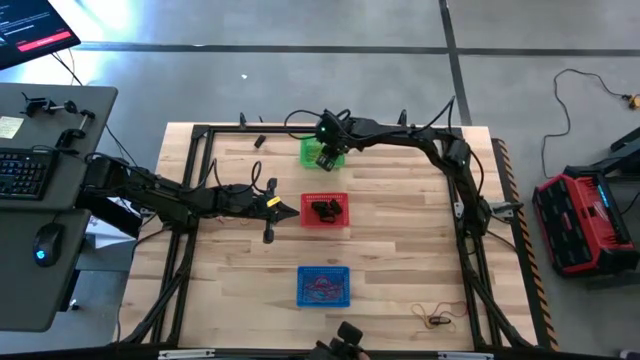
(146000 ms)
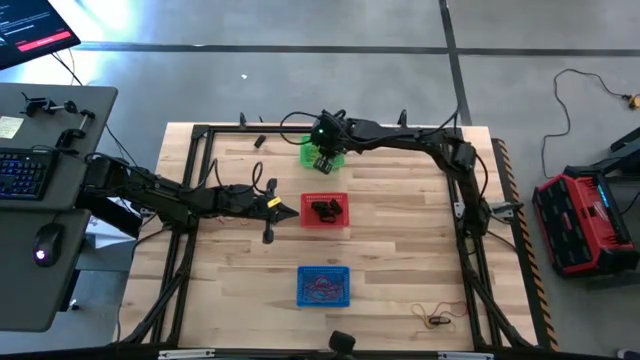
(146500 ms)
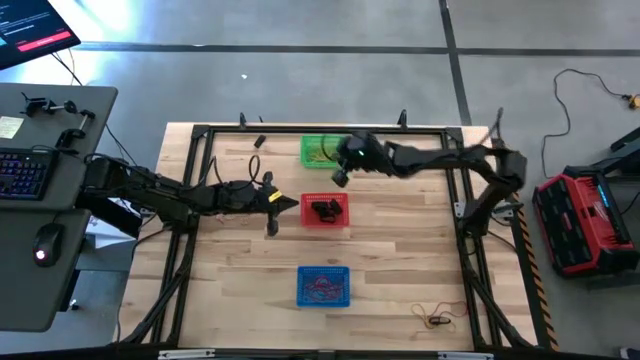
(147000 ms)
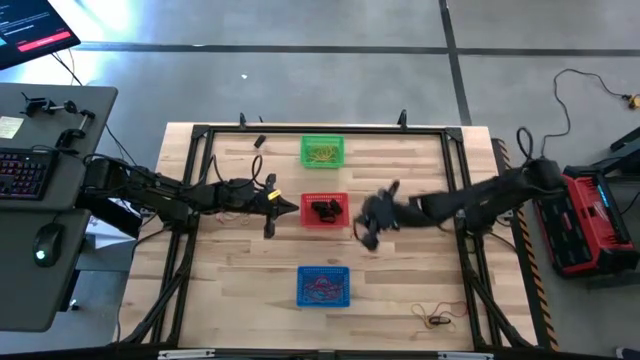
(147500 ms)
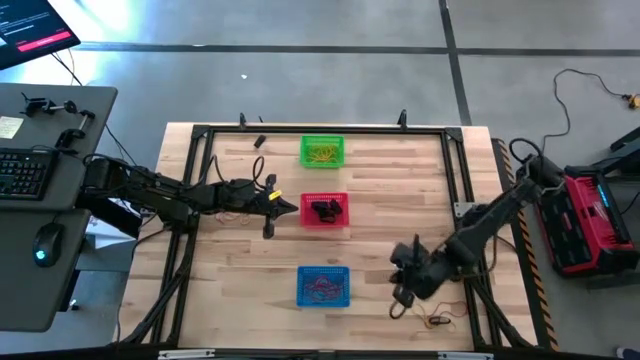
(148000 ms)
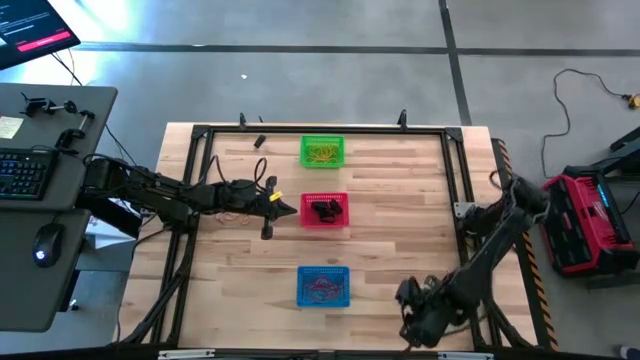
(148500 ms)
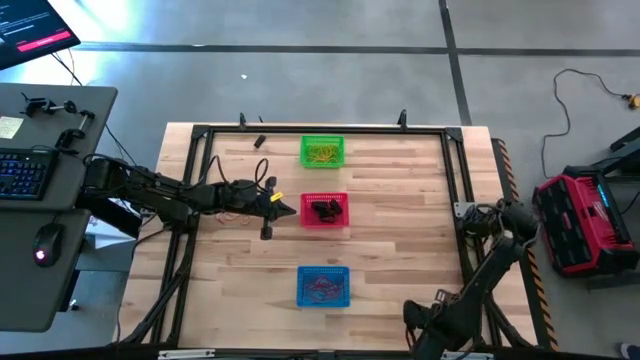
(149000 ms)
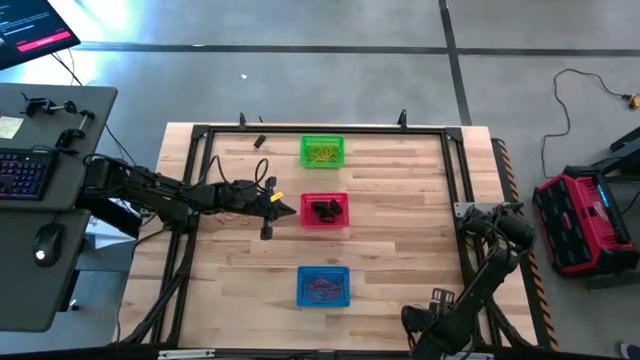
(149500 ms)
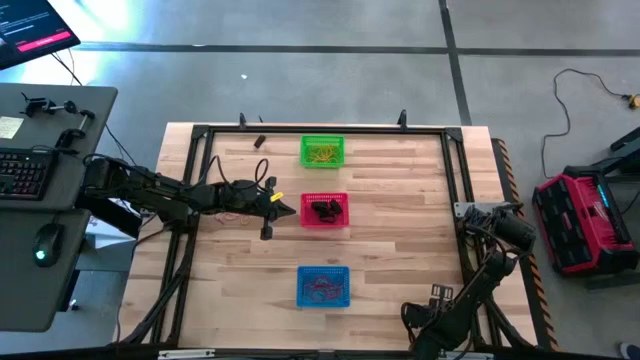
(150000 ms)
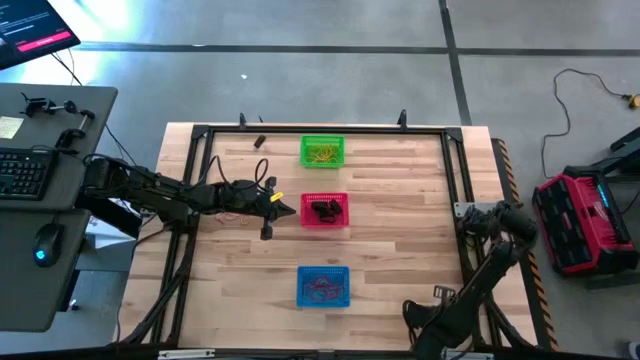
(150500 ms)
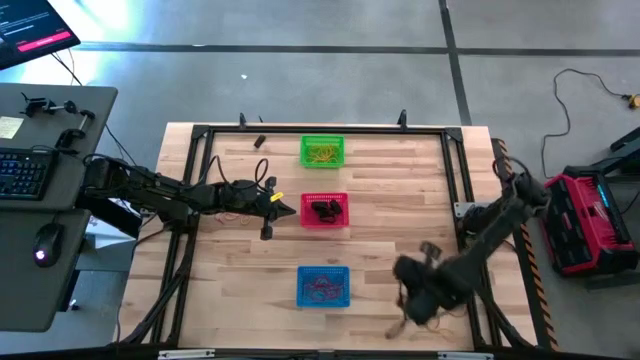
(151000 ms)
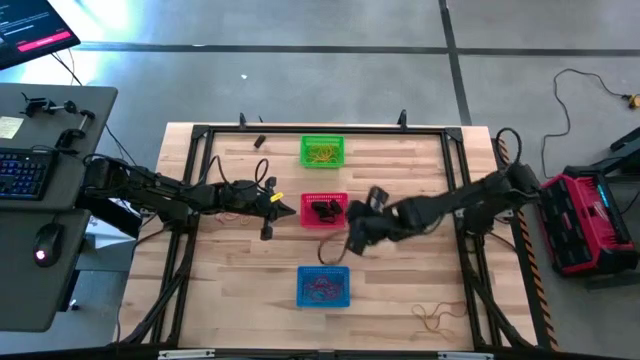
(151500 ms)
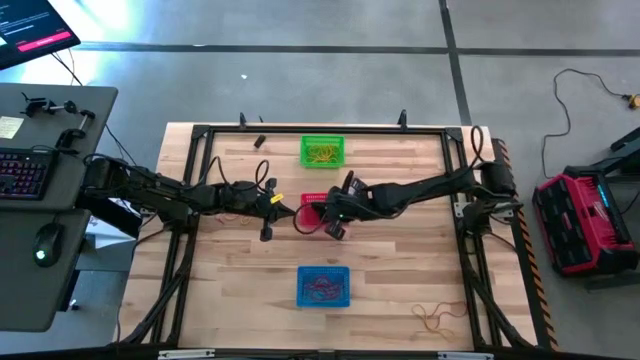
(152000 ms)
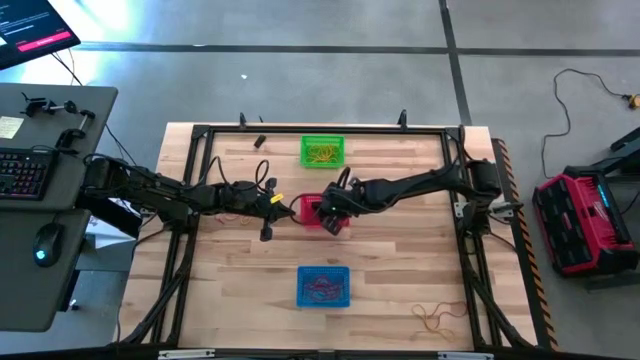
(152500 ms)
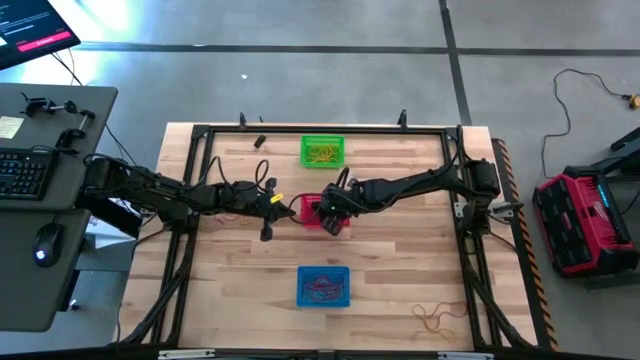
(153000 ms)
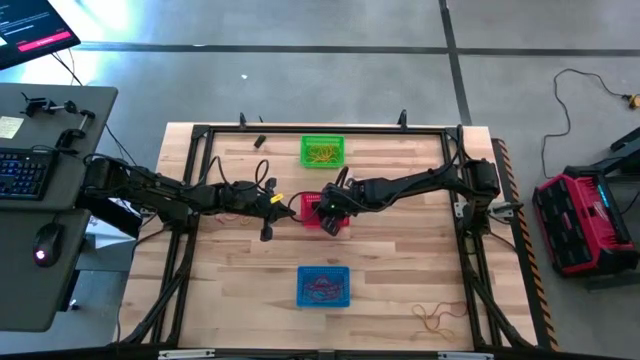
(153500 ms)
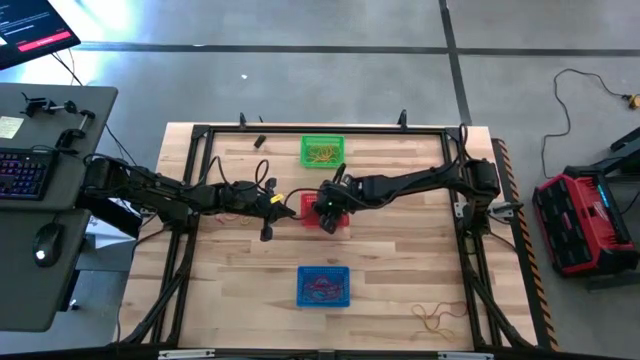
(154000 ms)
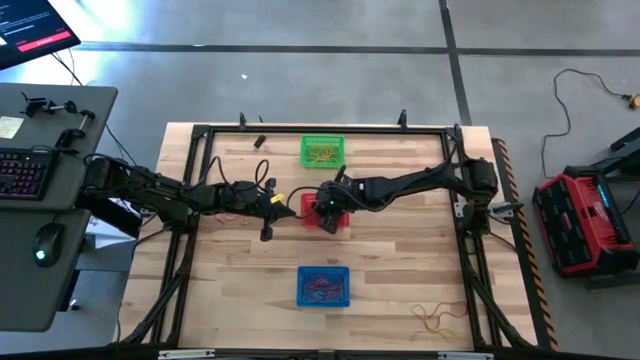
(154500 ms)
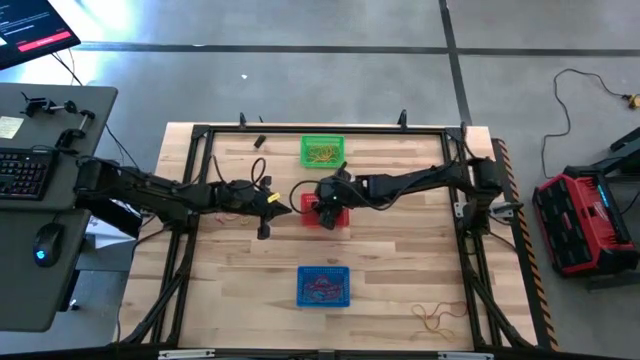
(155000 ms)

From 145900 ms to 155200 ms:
Task: Sort rubber bands into baskets
Put the black rubber band into the red bin

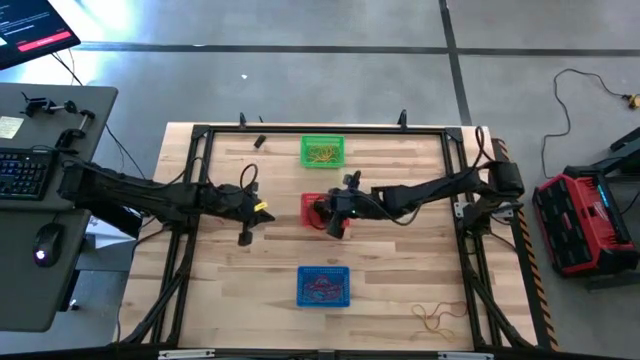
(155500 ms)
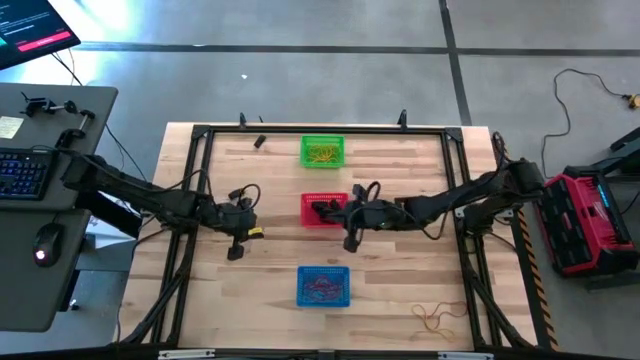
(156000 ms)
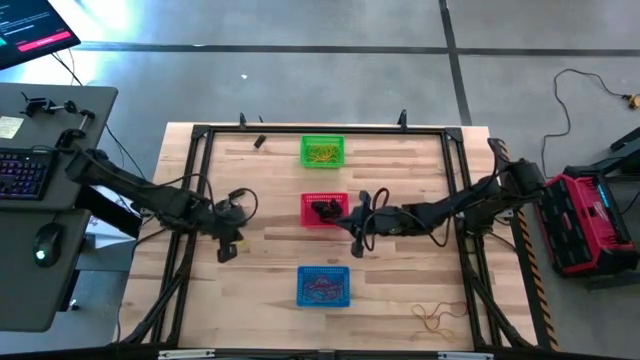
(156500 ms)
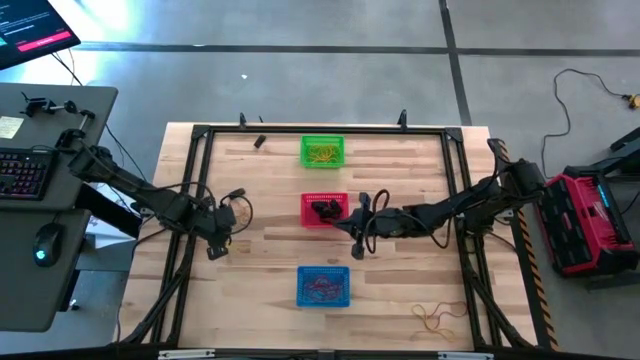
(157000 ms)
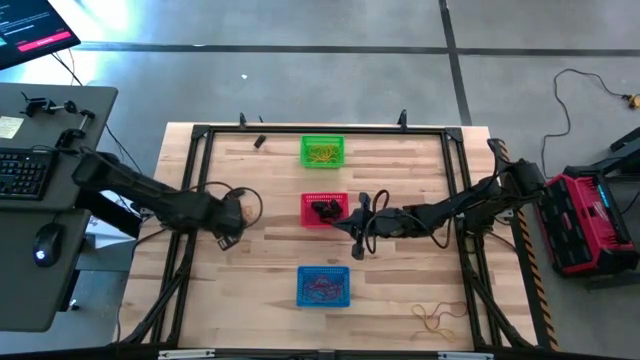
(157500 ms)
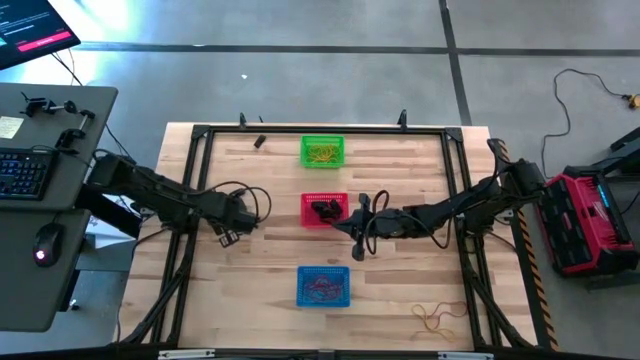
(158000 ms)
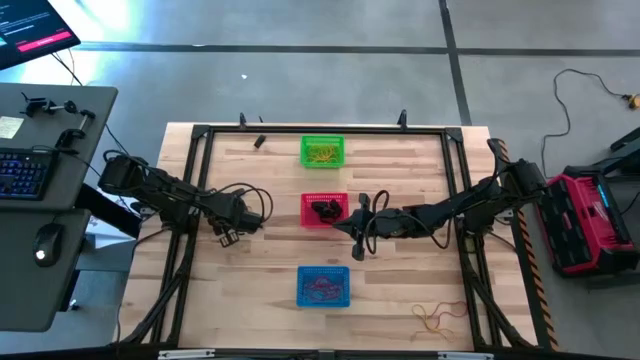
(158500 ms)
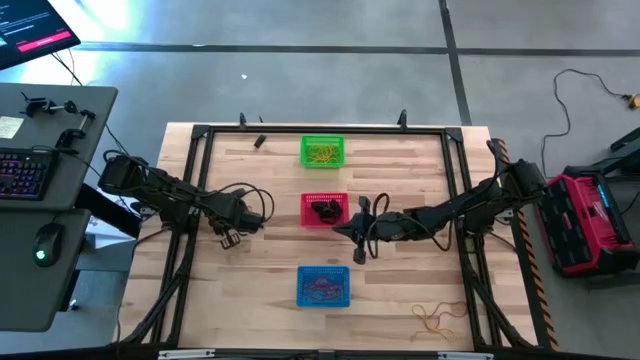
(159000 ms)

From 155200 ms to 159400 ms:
Put the red rubber band into the blue bin

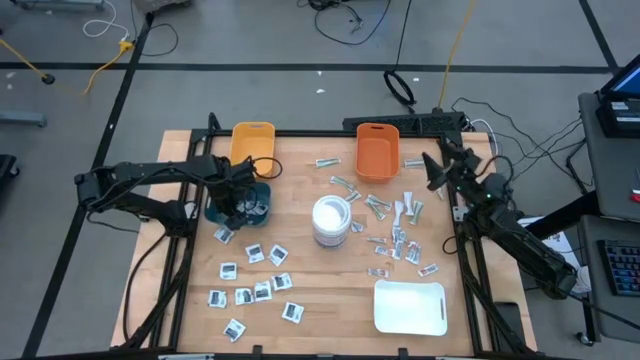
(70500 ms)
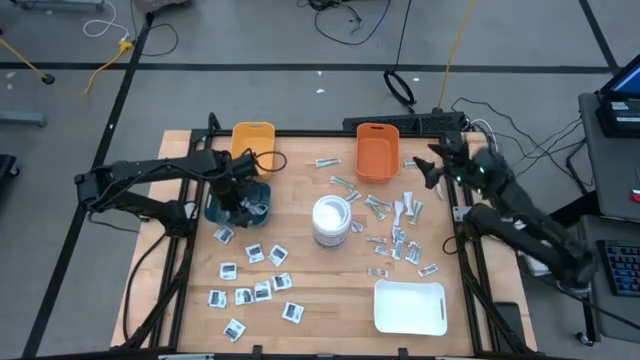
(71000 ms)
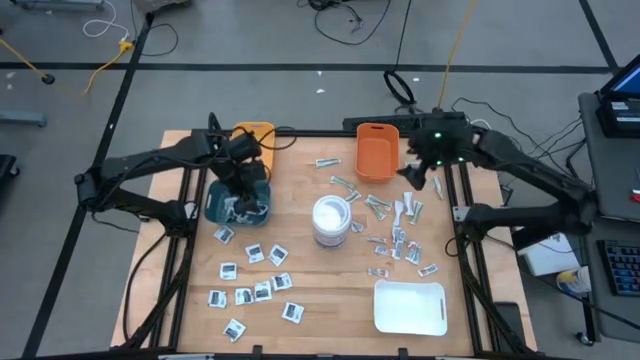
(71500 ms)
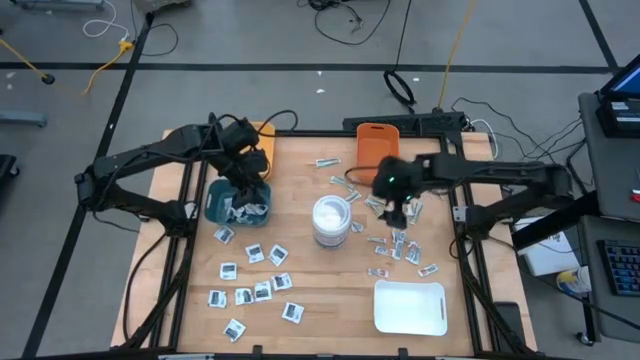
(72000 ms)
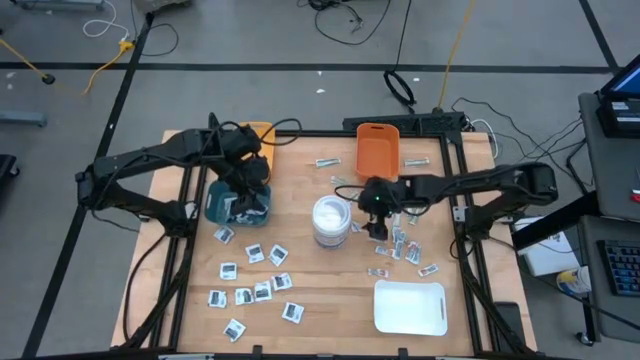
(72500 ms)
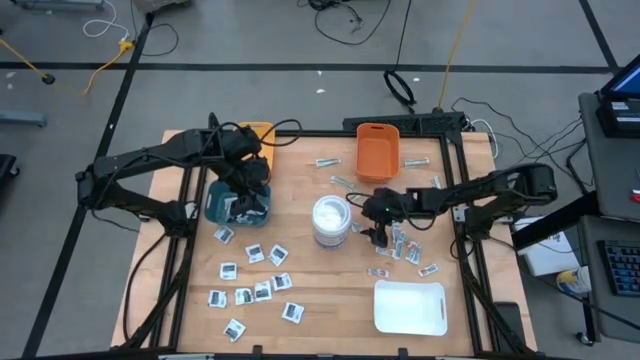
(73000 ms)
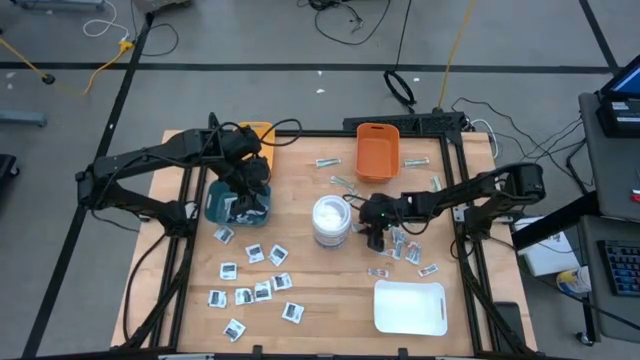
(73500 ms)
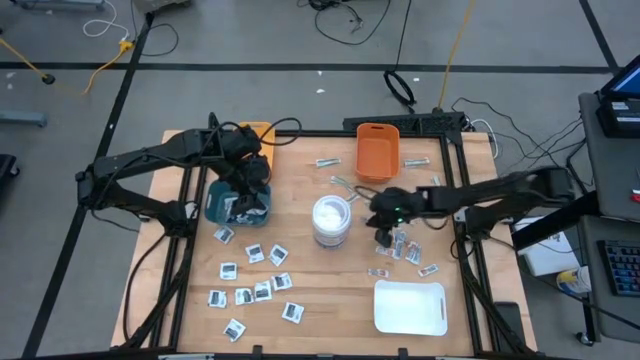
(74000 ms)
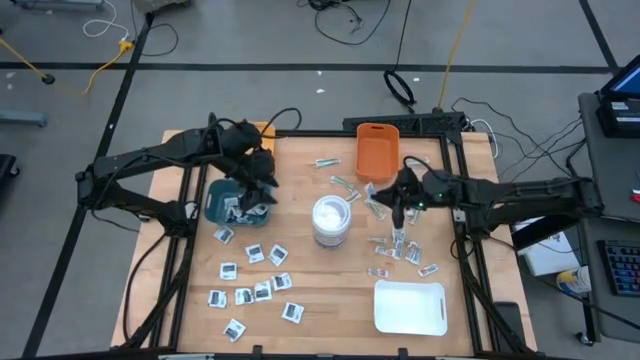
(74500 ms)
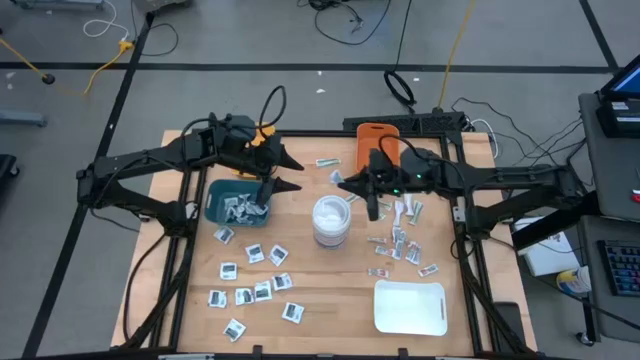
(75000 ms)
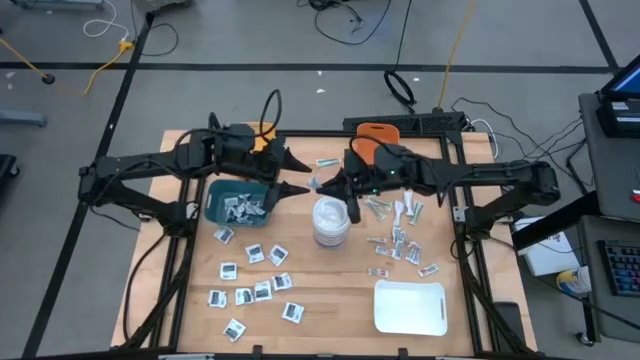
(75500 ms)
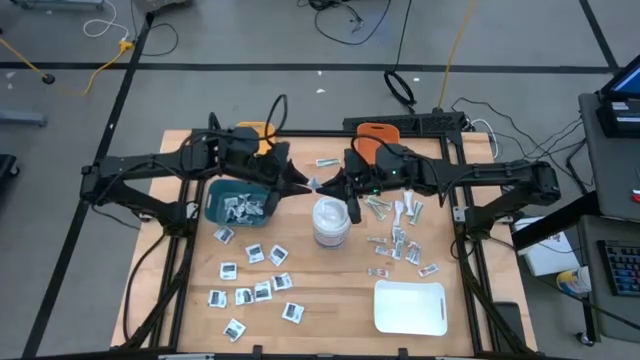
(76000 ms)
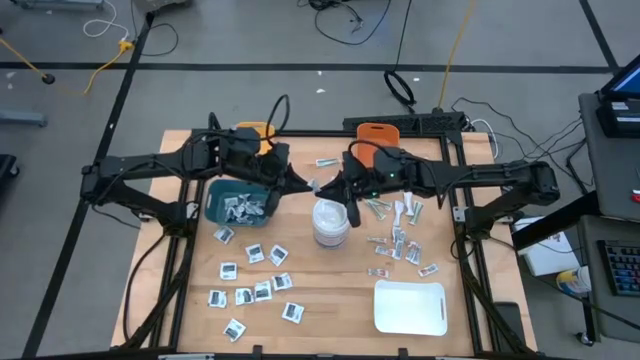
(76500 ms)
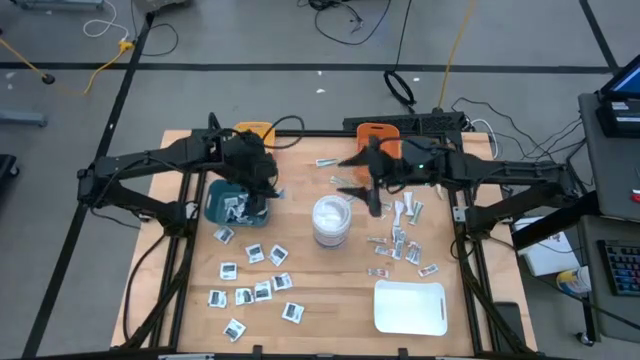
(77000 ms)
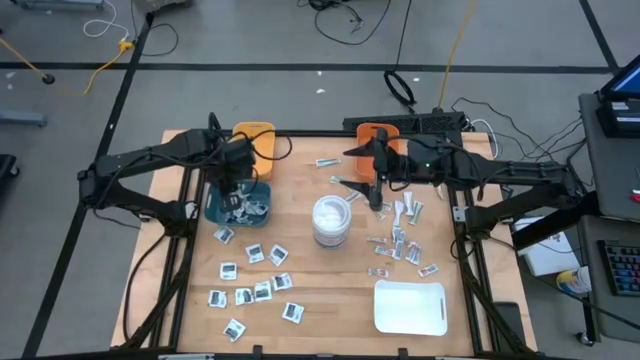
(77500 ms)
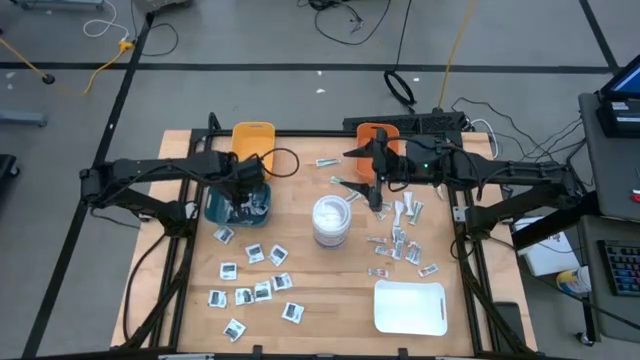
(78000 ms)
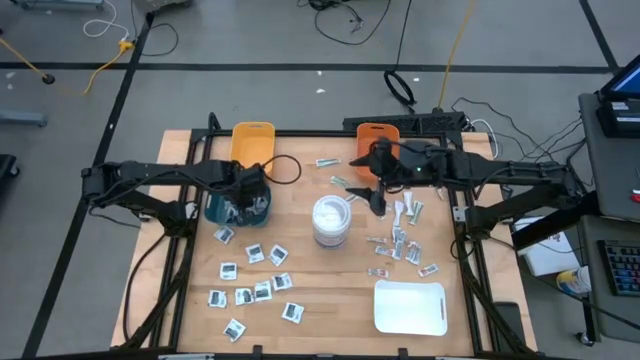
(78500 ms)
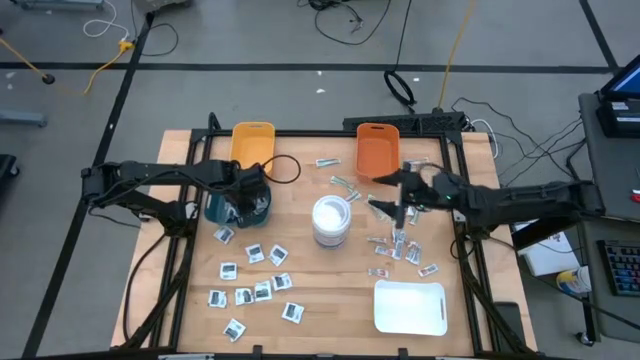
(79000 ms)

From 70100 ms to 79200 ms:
Task: Pick & Place First Aid Supplies
Put the blue pad into the blue bin
